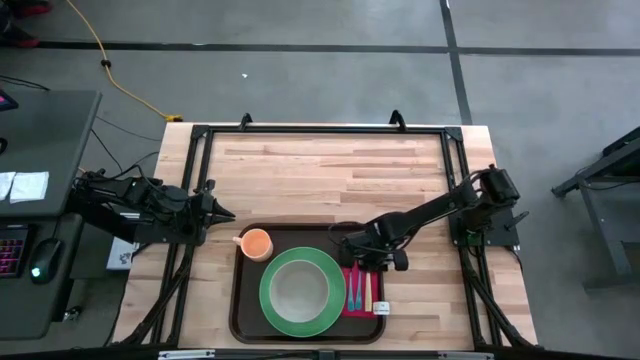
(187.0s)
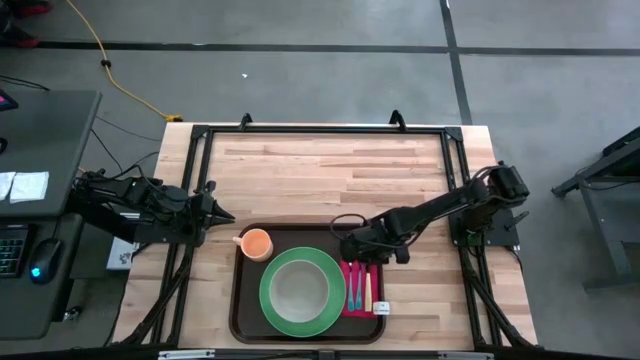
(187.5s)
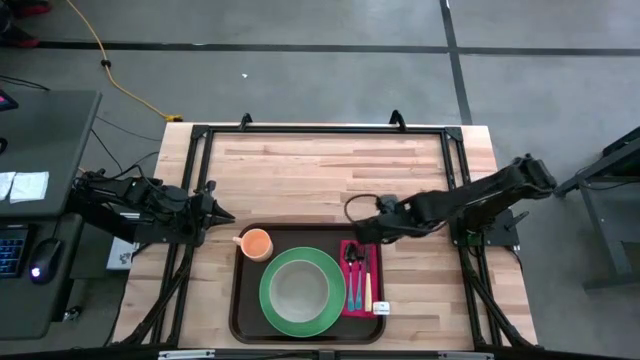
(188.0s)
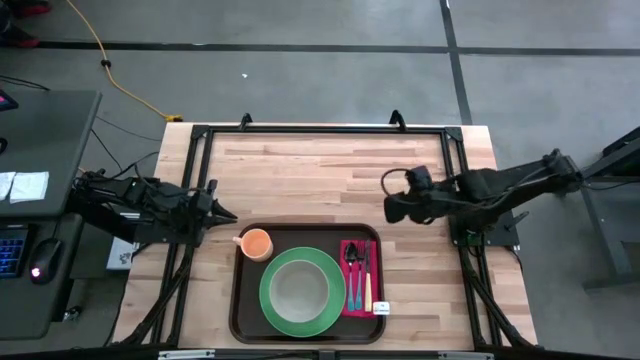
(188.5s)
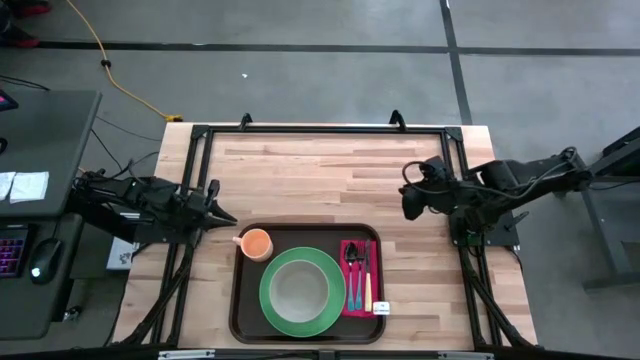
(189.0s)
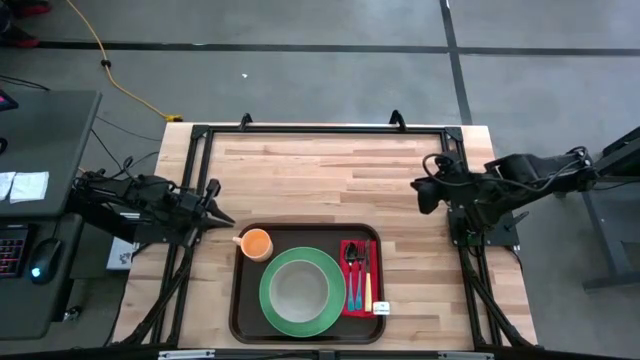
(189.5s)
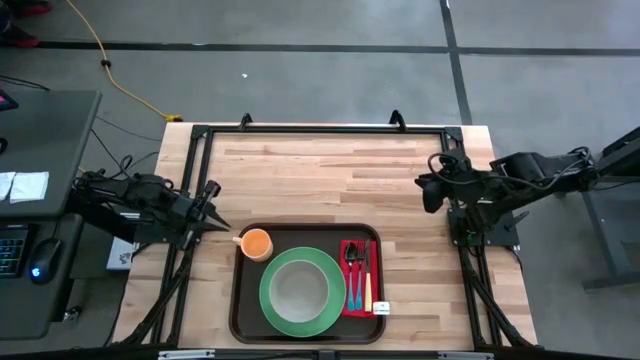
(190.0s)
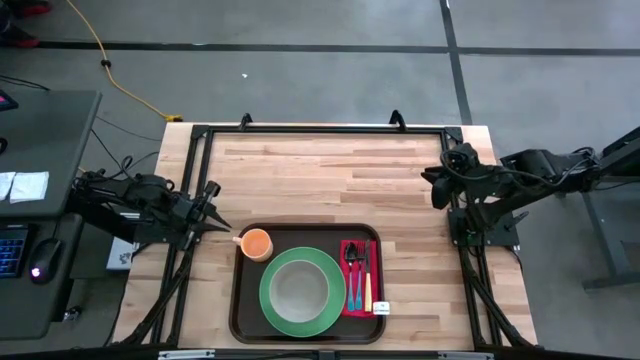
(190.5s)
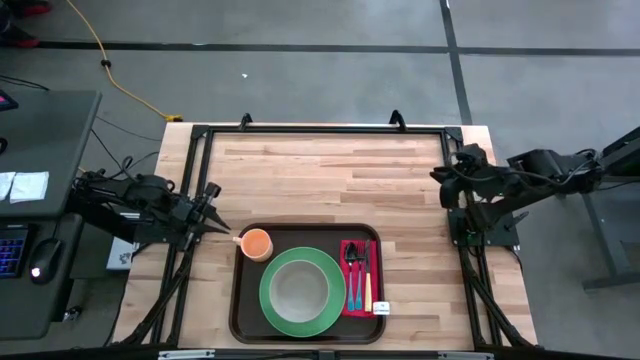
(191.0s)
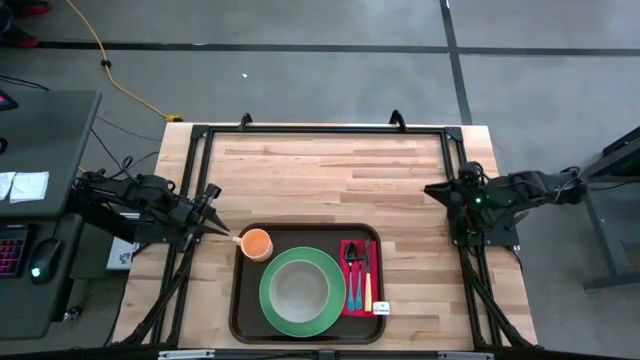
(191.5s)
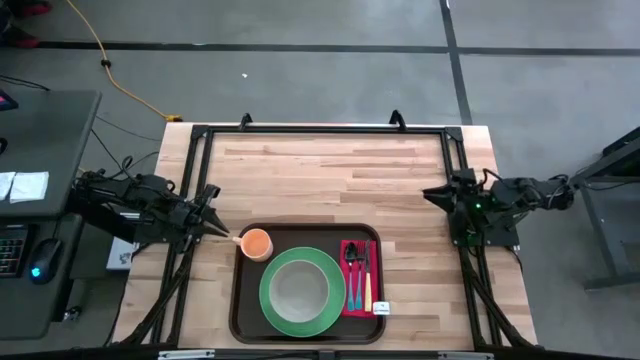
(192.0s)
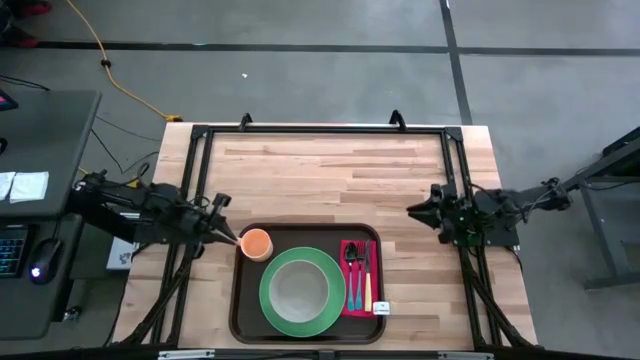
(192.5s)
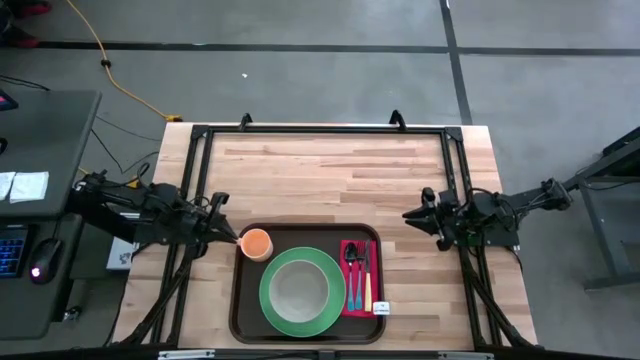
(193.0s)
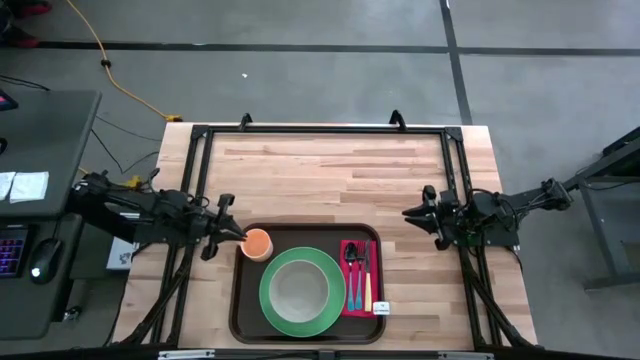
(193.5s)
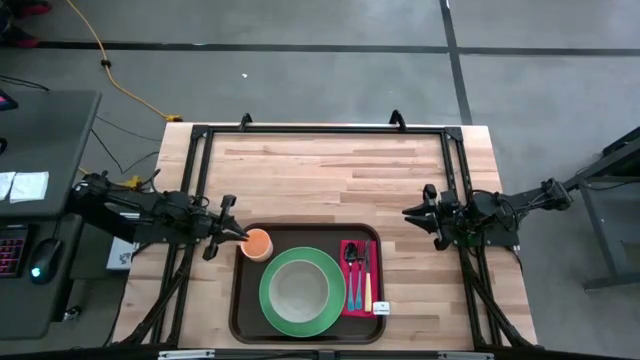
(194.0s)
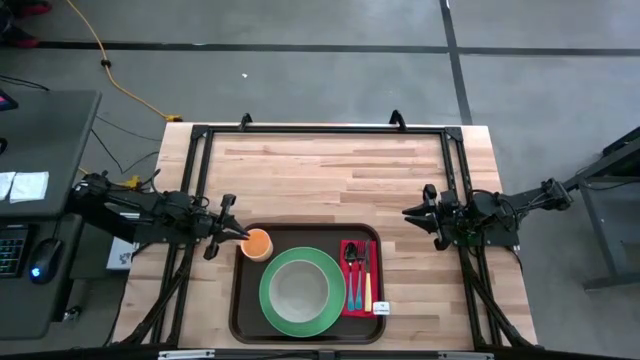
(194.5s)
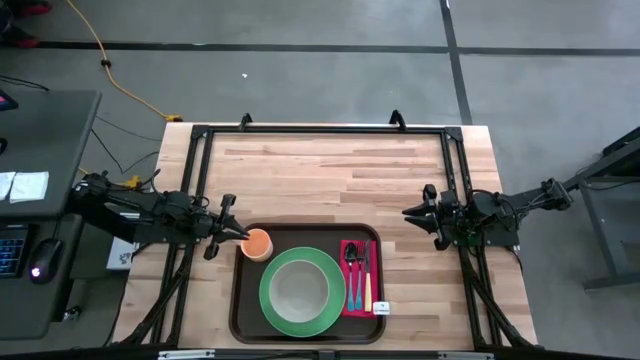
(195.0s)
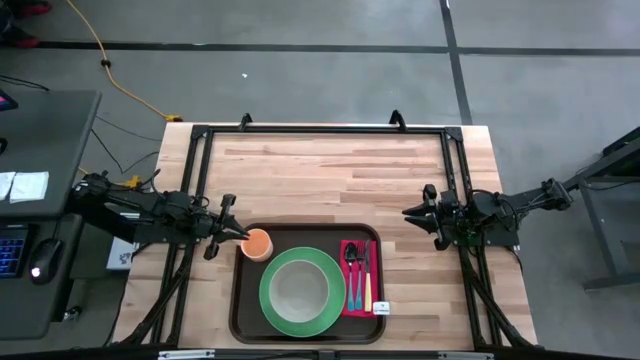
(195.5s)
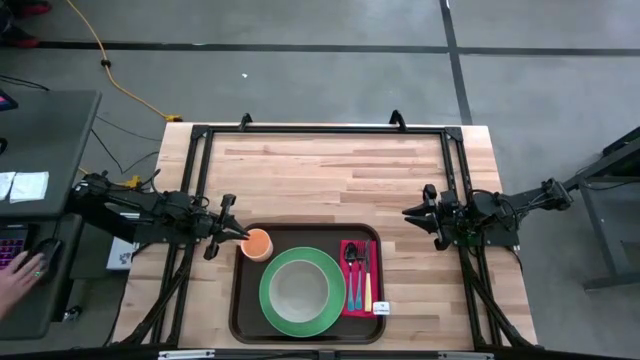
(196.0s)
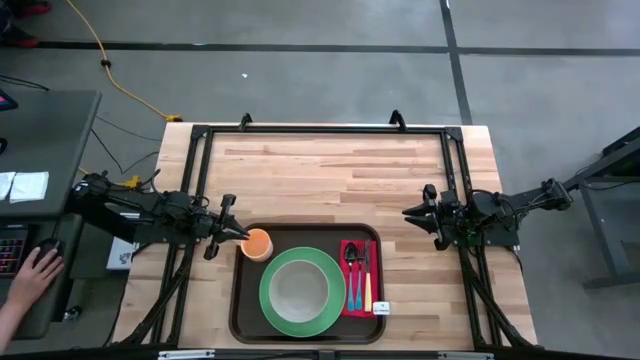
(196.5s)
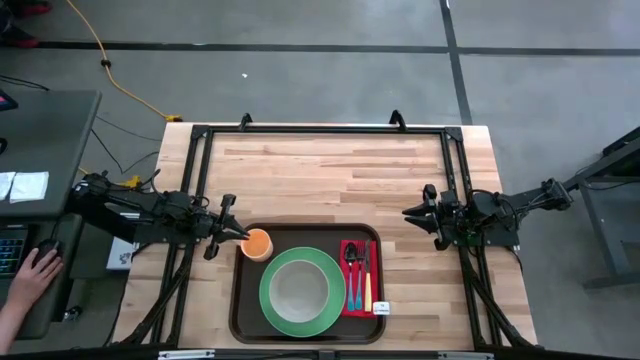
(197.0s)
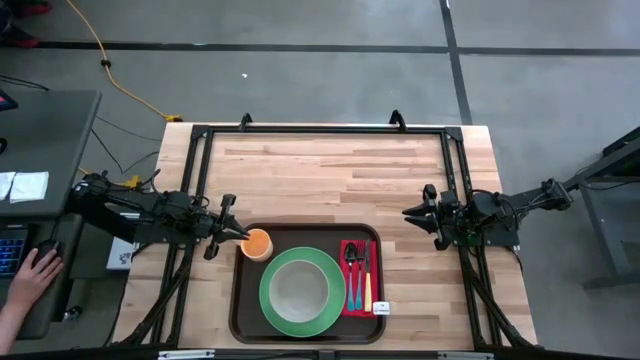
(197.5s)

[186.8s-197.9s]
Task: Set up tray
Return to Home Position

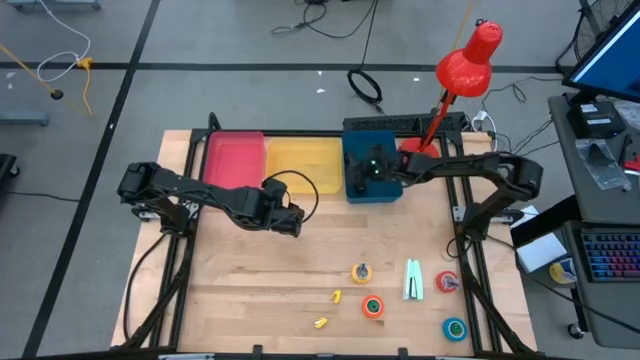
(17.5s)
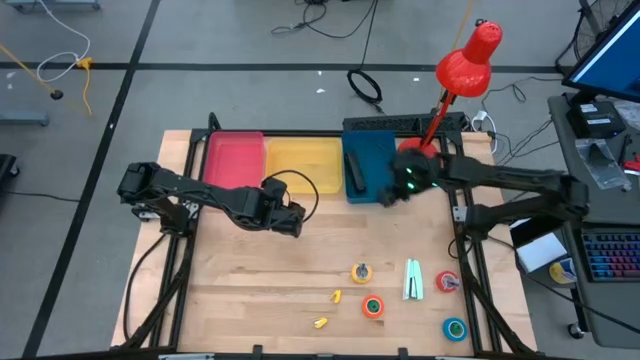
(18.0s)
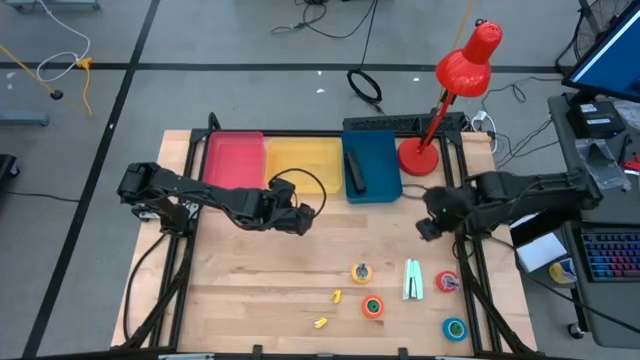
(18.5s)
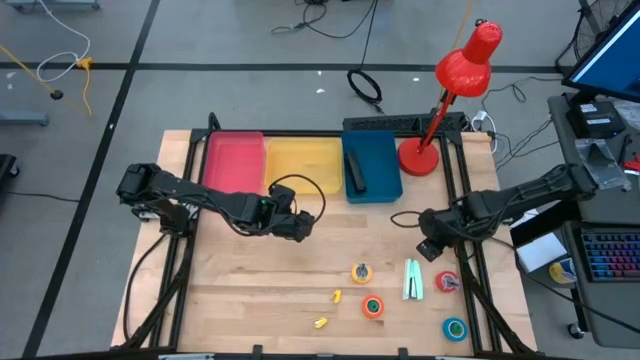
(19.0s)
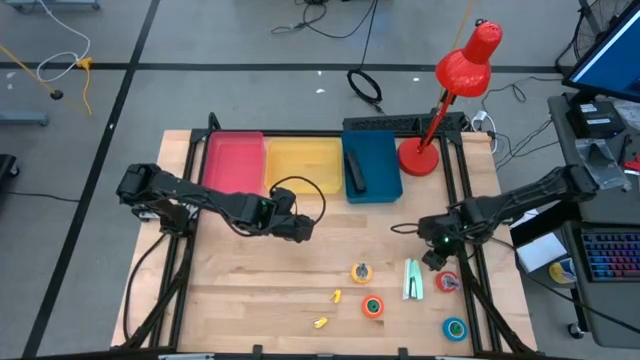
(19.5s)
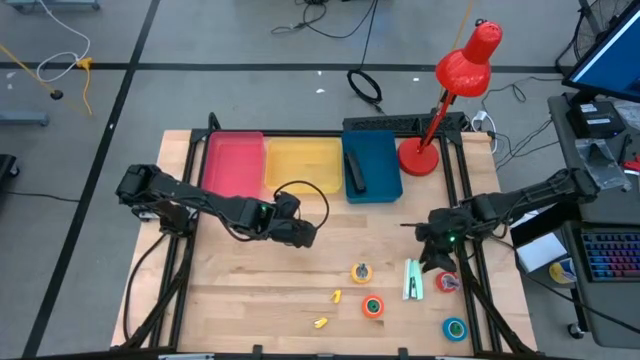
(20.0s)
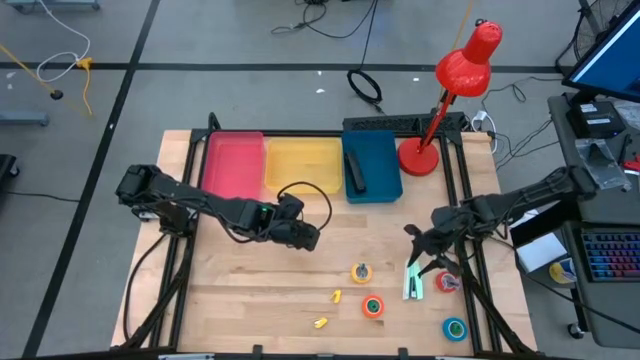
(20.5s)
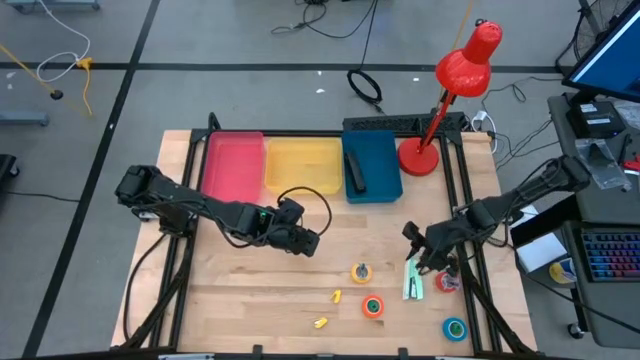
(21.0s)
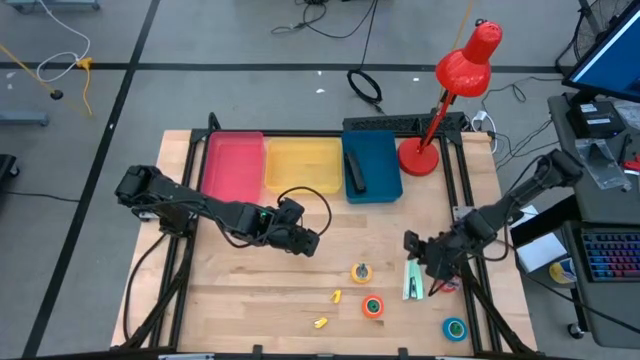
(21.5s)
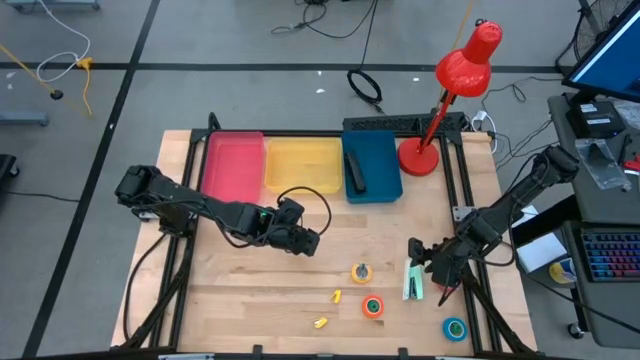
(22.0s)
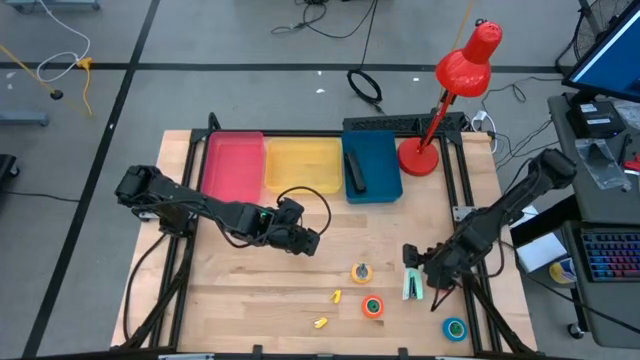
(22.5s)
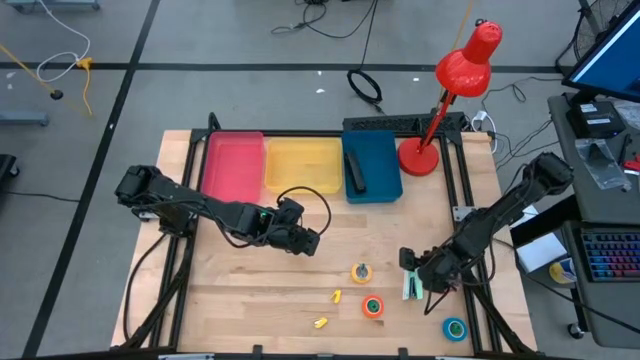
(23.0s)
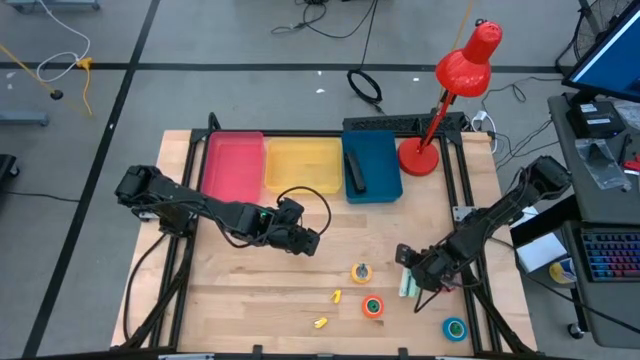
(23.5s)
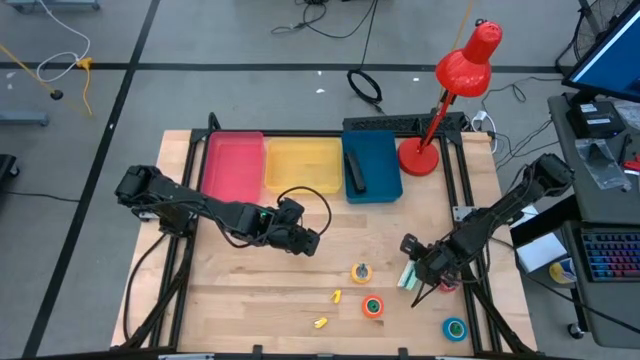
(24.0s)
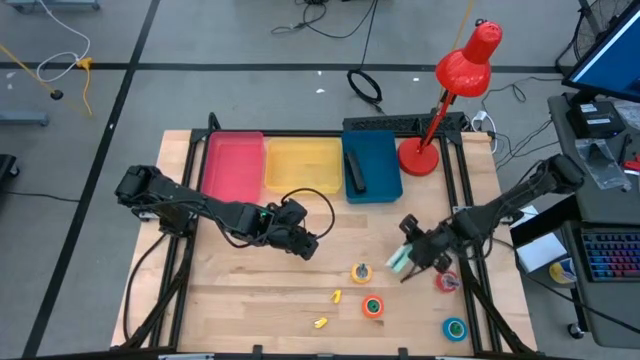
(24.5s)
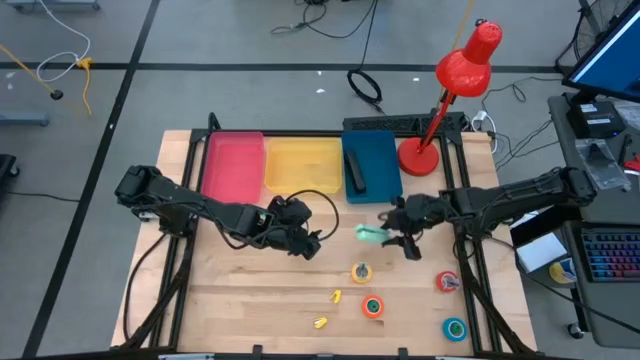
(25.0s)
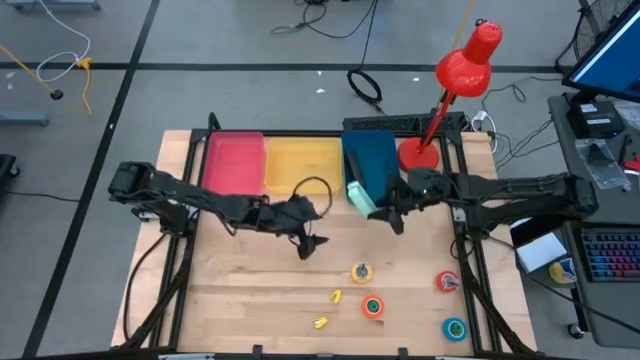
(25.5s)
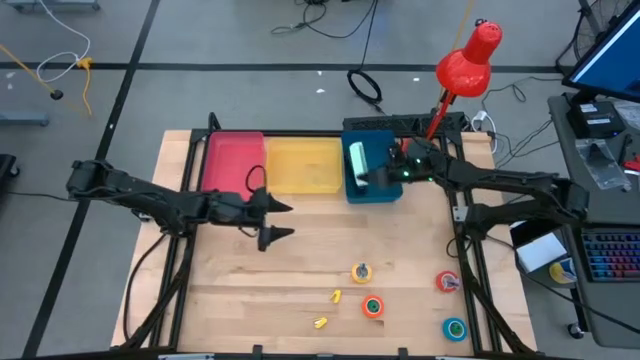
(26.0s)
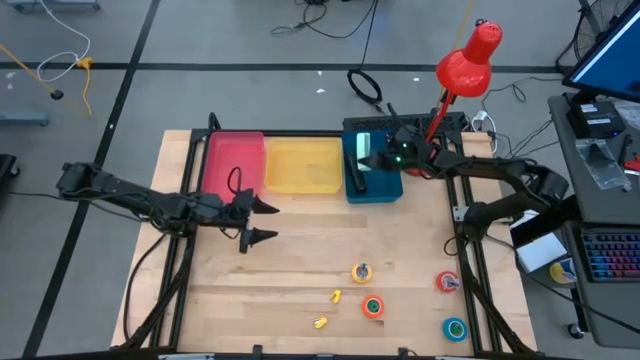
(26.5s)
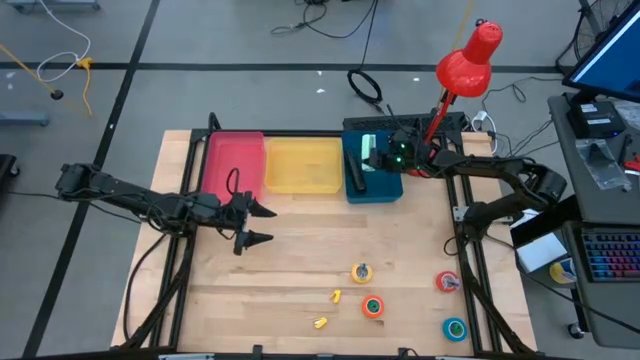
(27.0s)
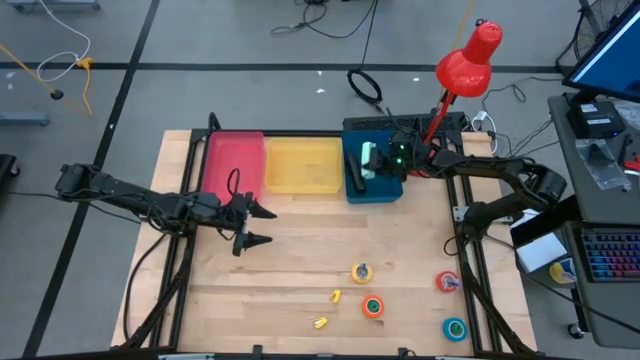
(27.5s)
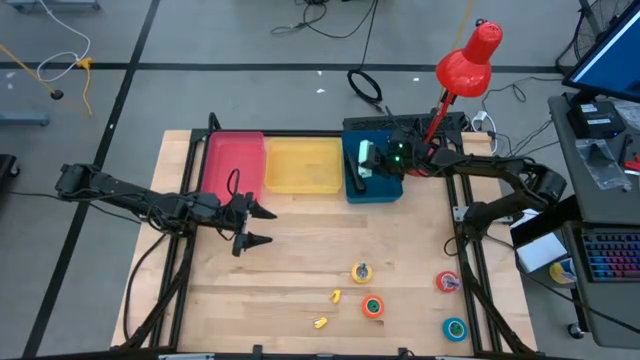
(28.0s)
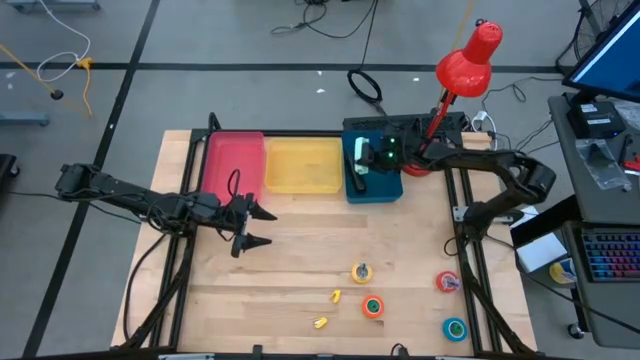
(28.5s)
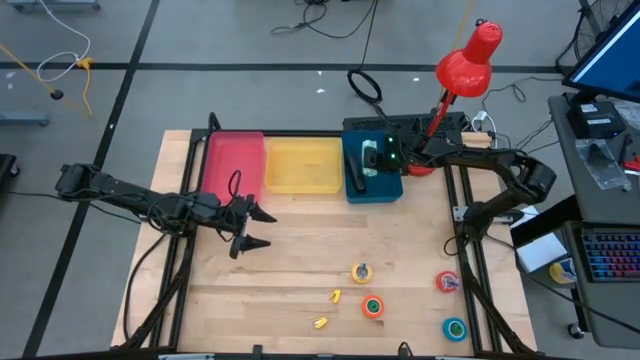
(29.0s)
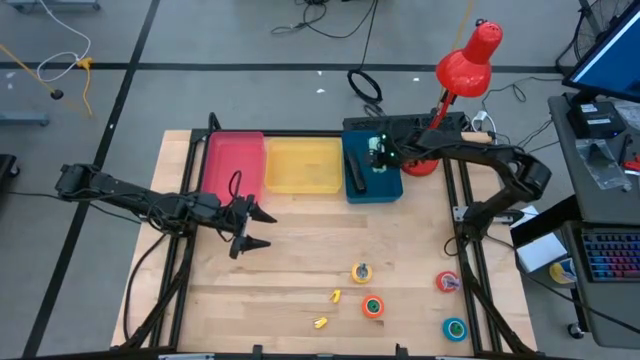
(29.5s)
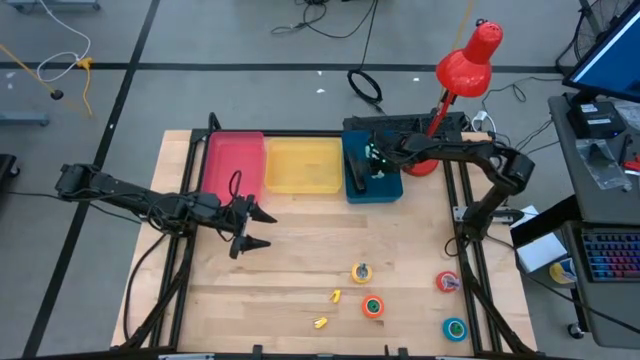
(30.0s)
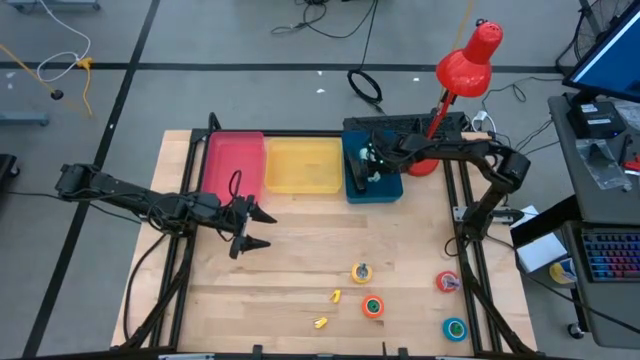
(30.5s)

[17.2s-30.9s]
Task: Pick and place Stapler, Stapler remover, tape
Put the blue large stapler into the blue bin
